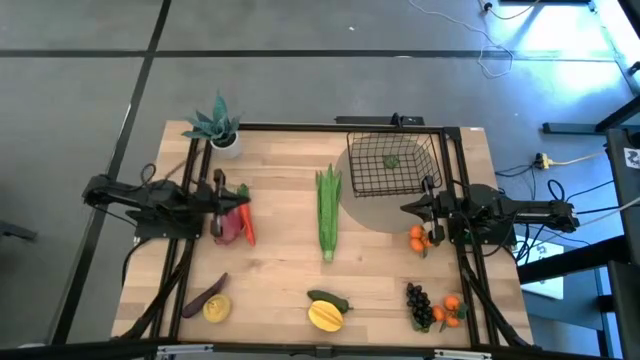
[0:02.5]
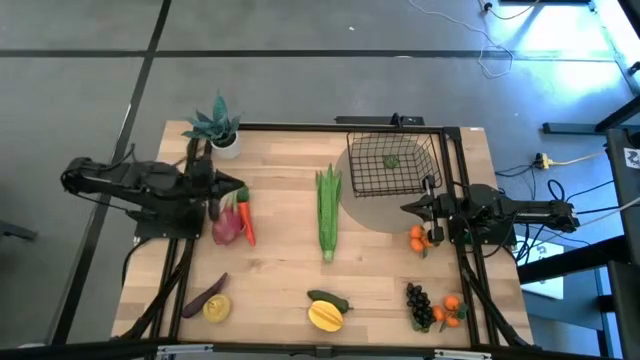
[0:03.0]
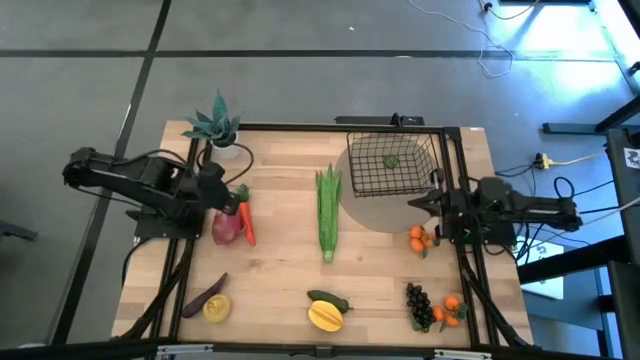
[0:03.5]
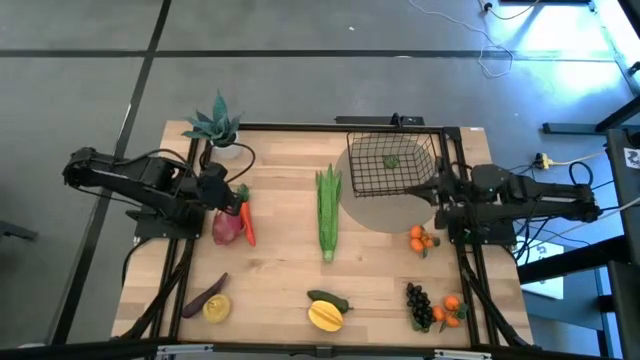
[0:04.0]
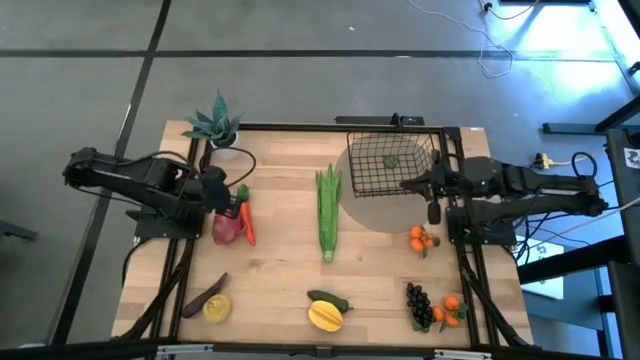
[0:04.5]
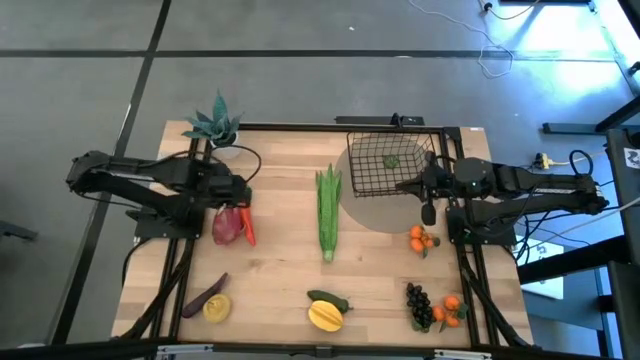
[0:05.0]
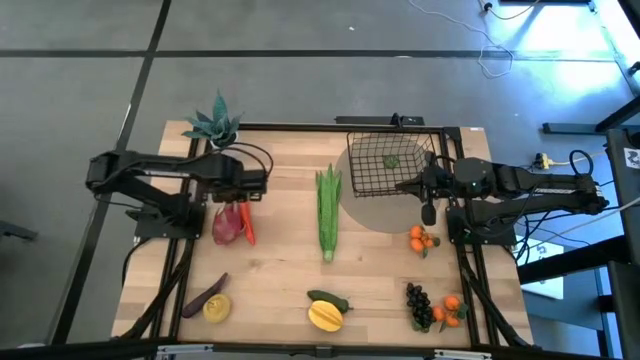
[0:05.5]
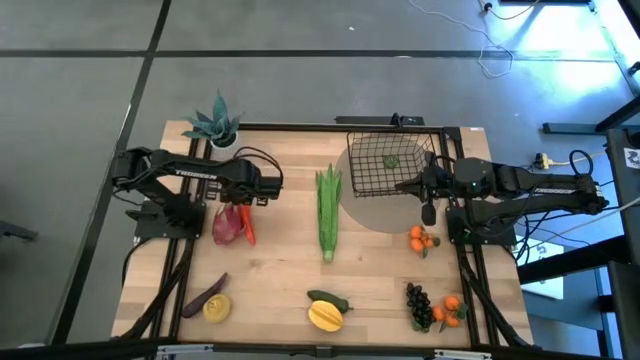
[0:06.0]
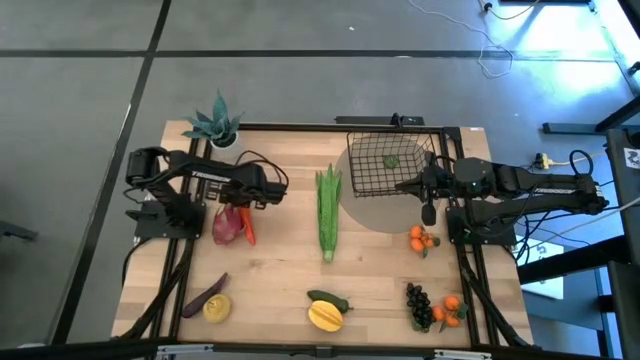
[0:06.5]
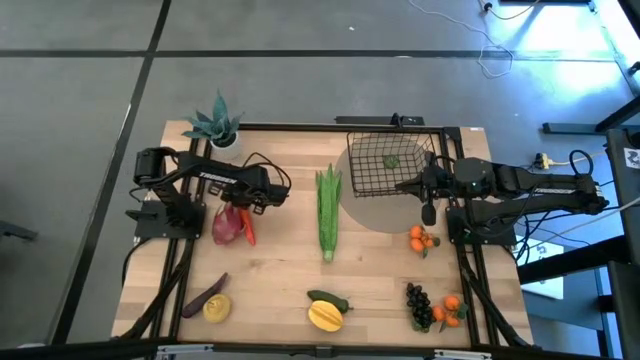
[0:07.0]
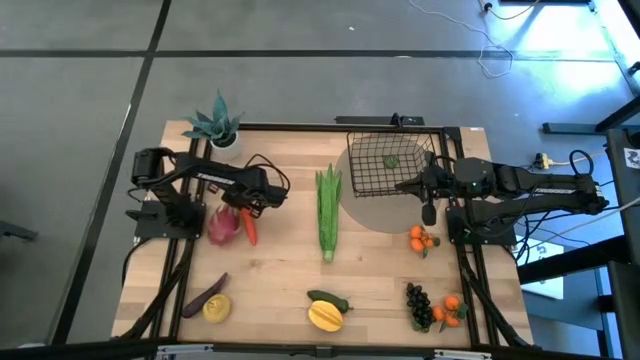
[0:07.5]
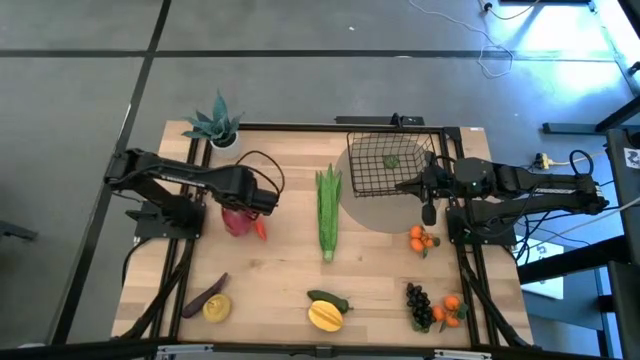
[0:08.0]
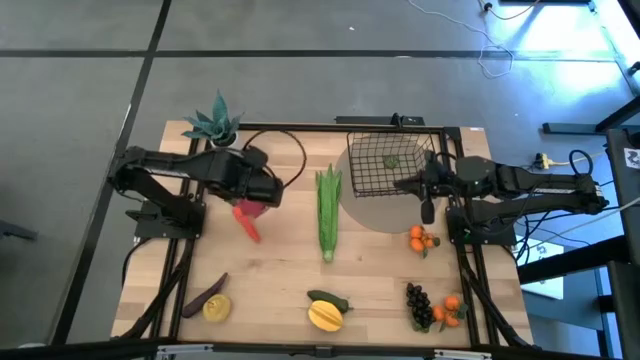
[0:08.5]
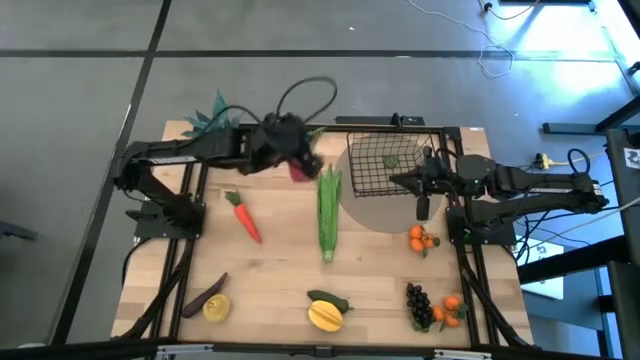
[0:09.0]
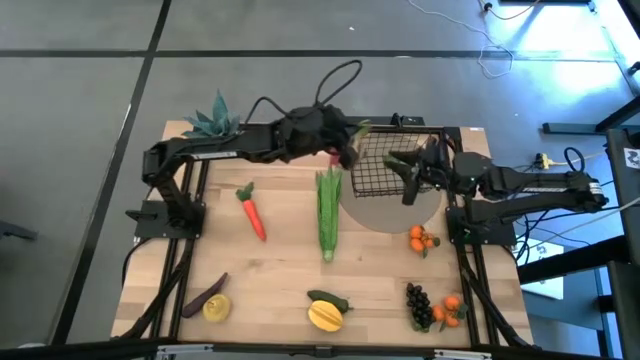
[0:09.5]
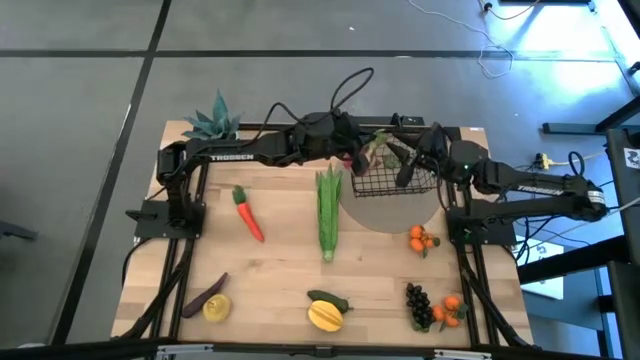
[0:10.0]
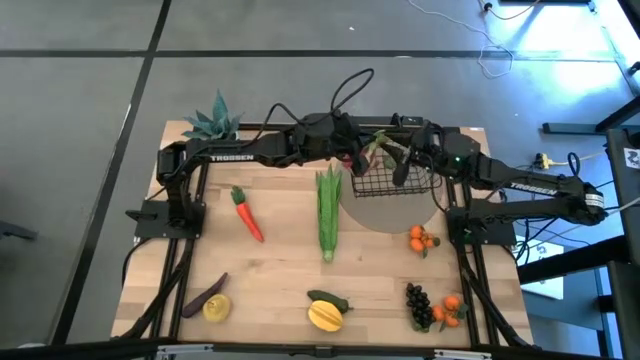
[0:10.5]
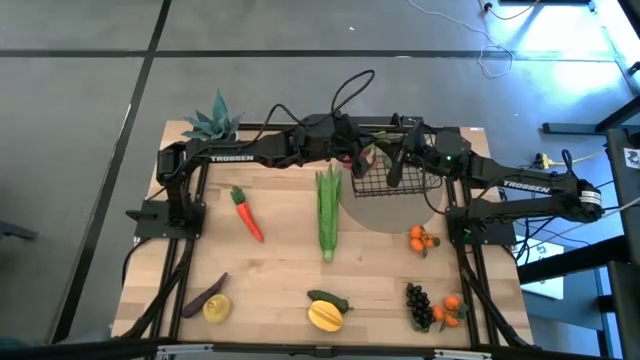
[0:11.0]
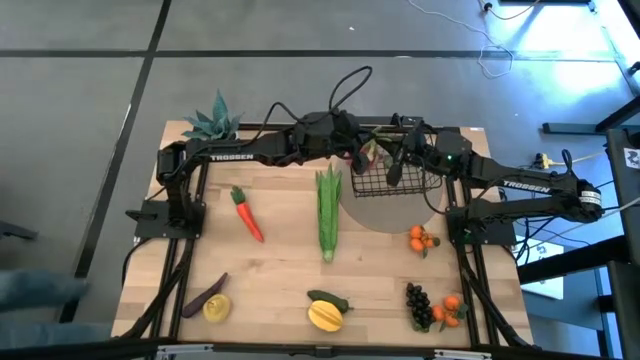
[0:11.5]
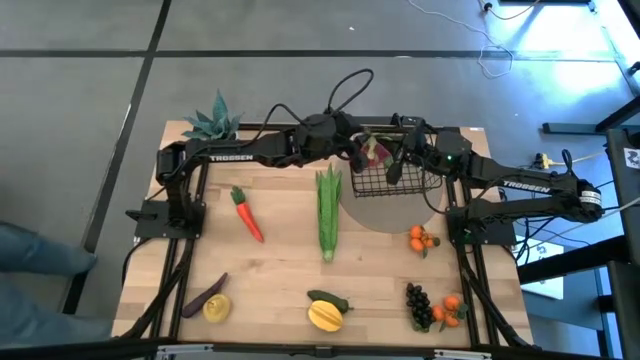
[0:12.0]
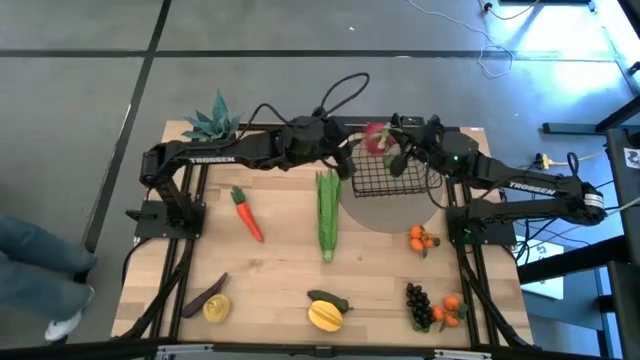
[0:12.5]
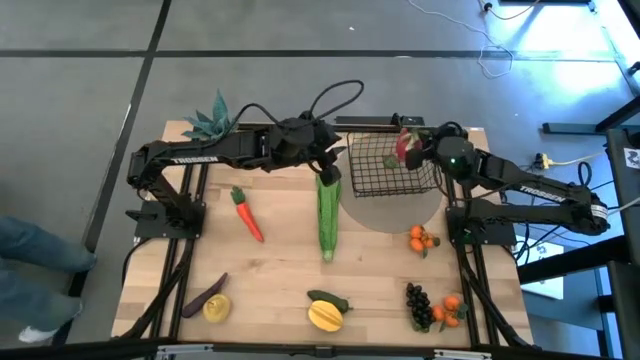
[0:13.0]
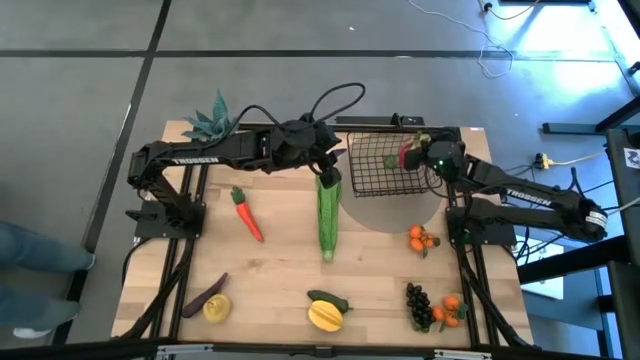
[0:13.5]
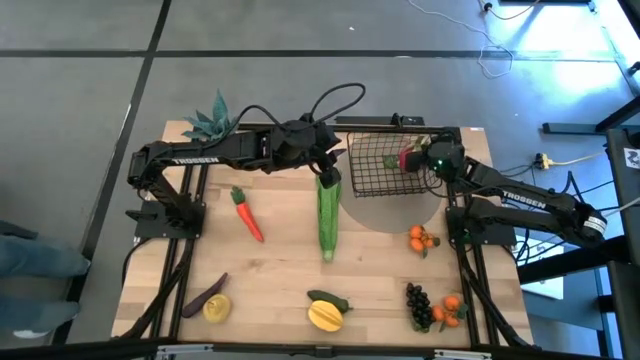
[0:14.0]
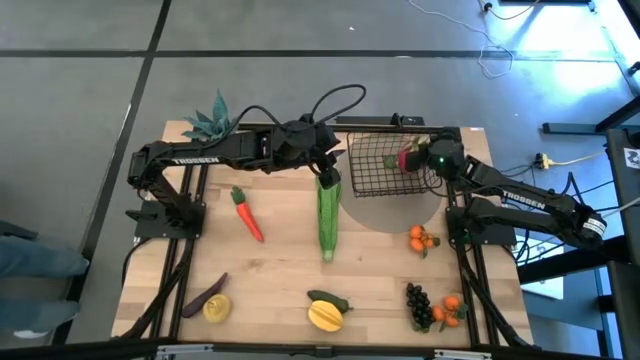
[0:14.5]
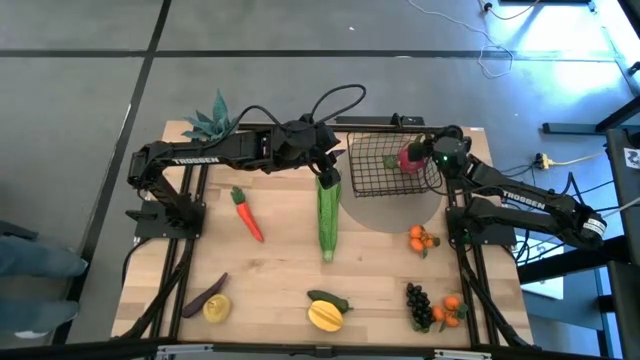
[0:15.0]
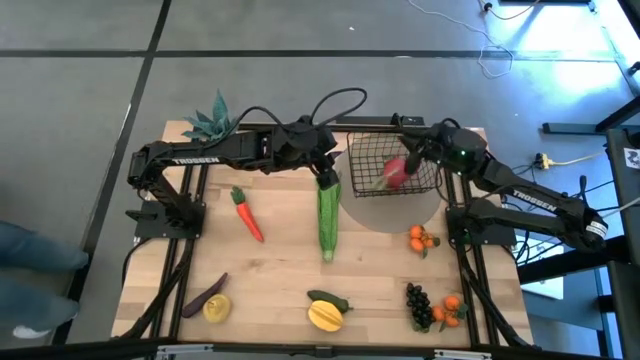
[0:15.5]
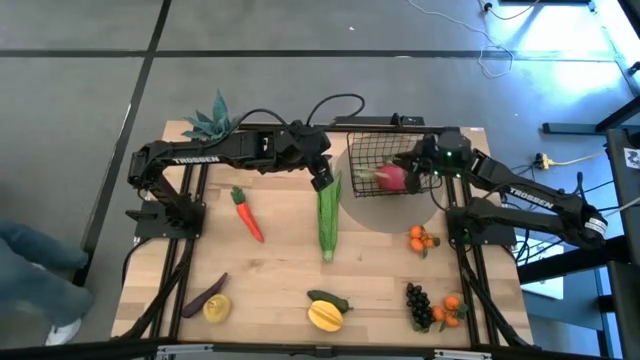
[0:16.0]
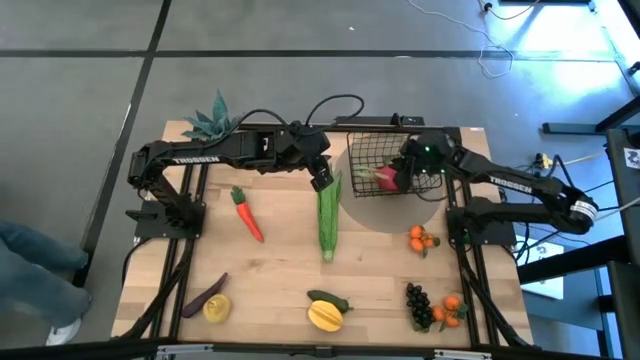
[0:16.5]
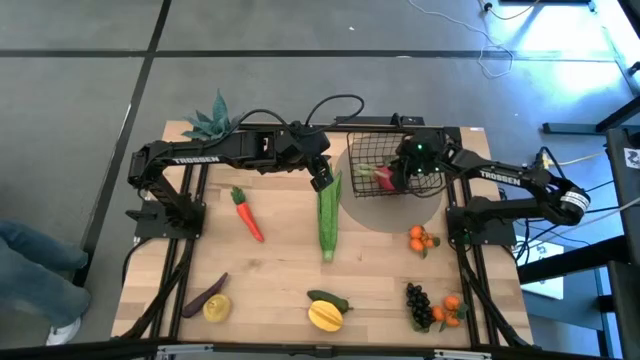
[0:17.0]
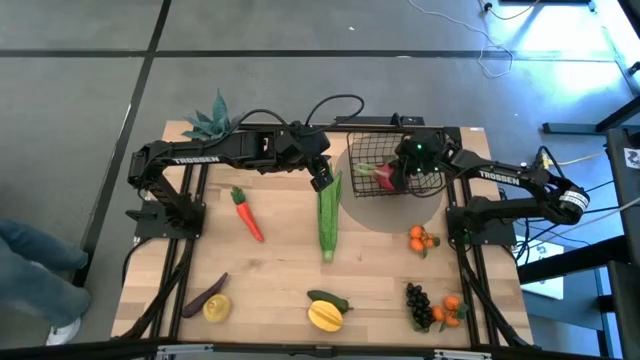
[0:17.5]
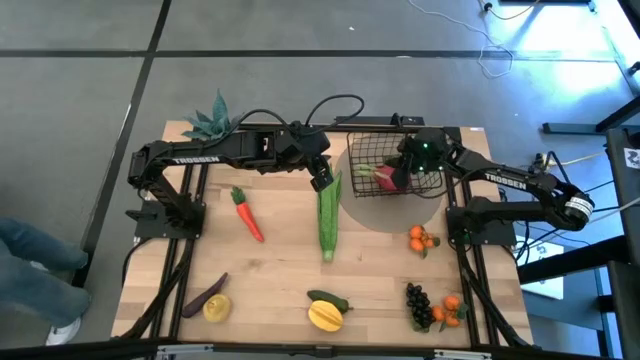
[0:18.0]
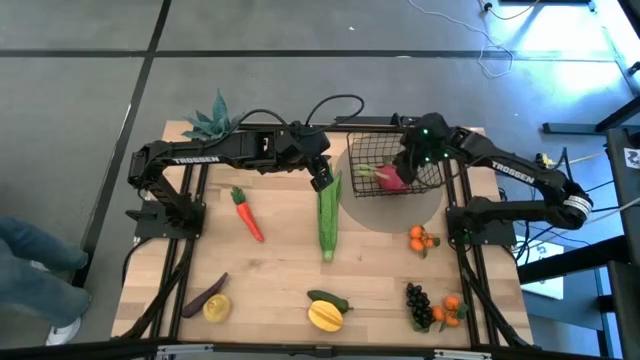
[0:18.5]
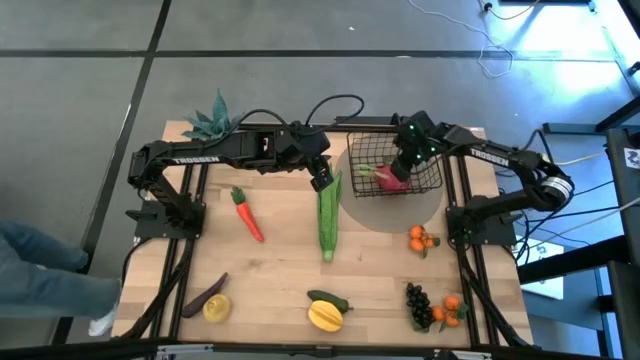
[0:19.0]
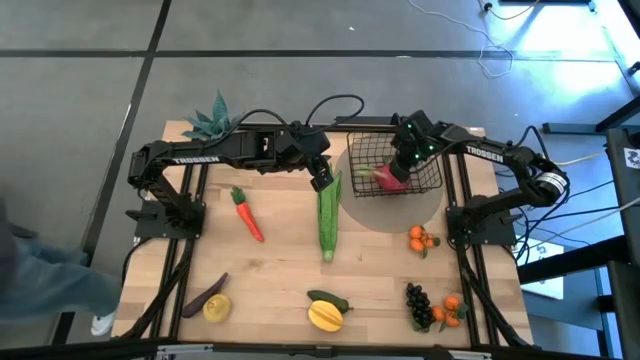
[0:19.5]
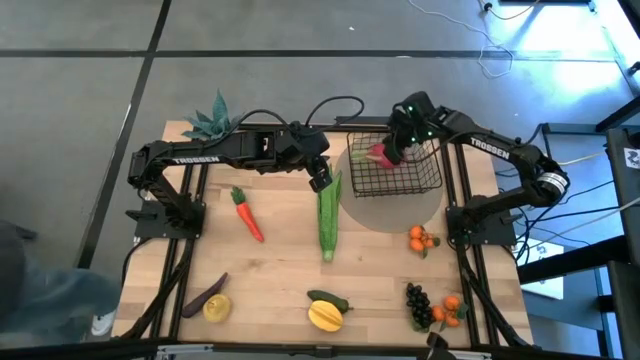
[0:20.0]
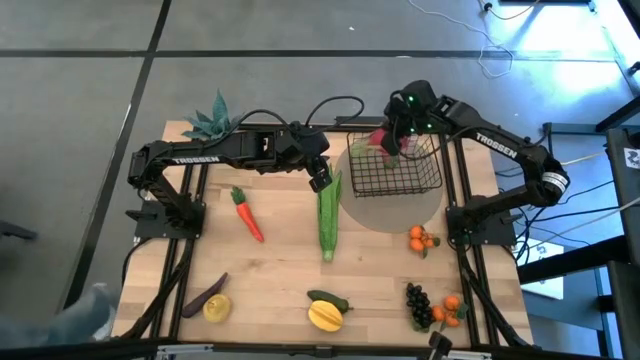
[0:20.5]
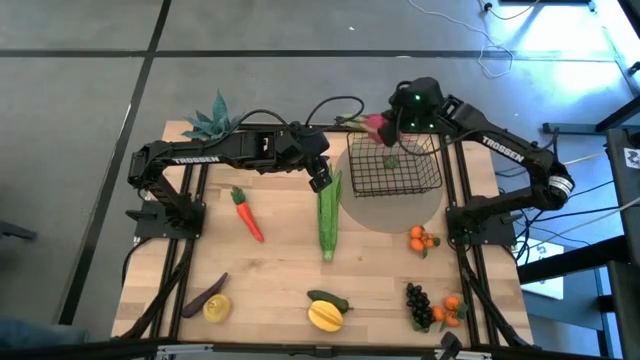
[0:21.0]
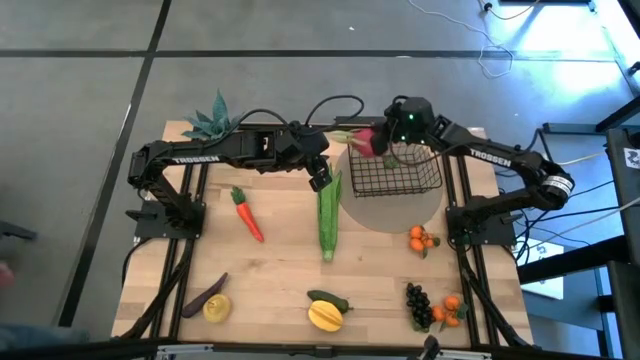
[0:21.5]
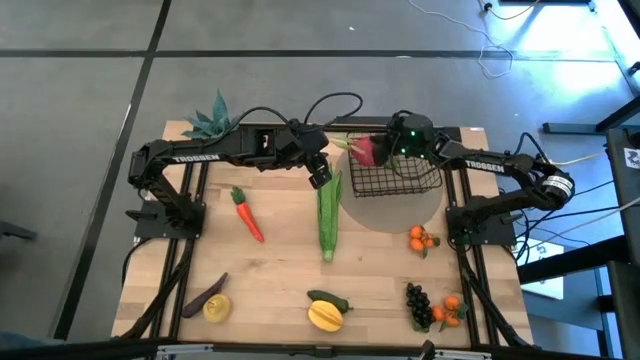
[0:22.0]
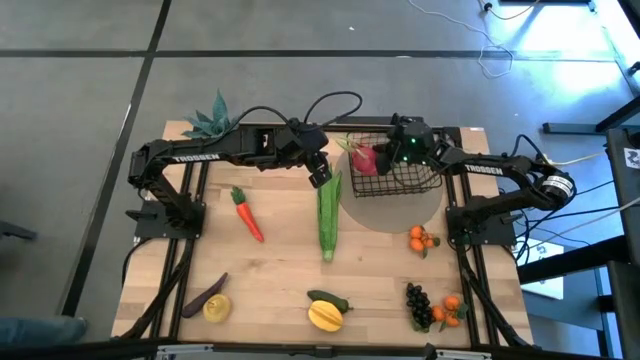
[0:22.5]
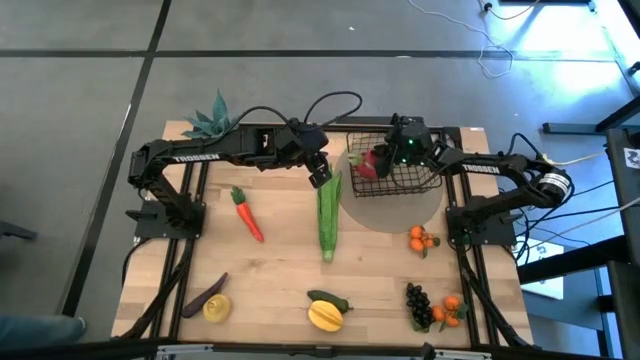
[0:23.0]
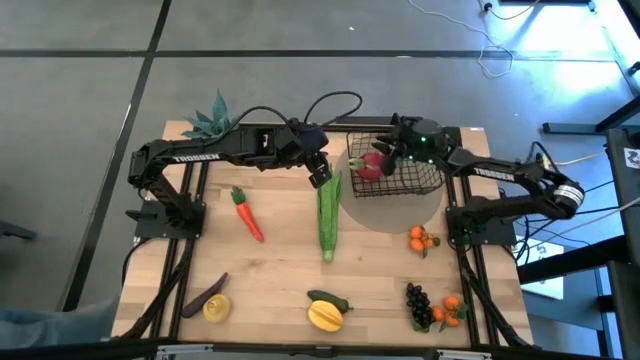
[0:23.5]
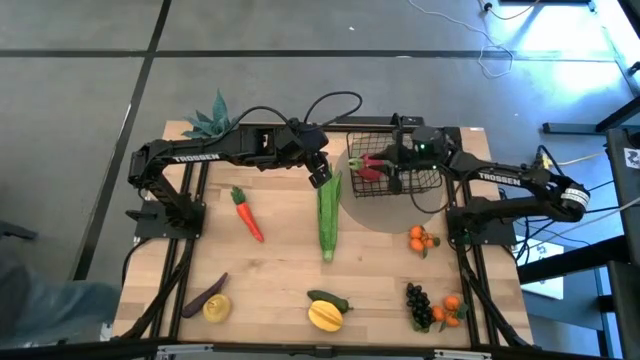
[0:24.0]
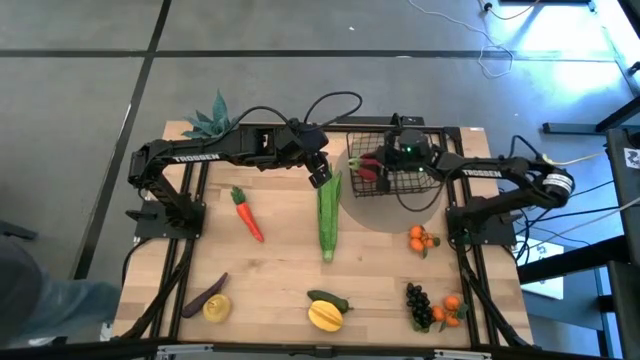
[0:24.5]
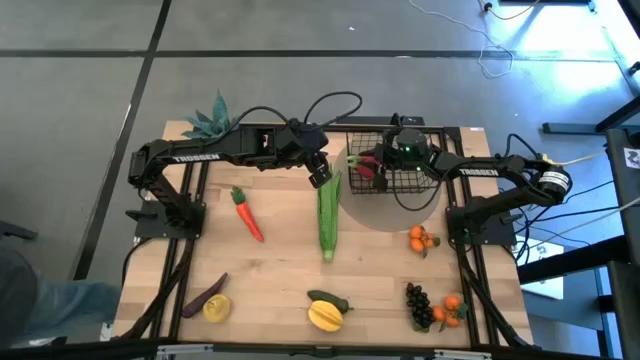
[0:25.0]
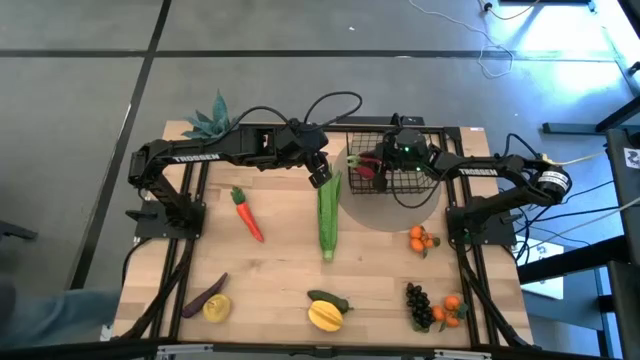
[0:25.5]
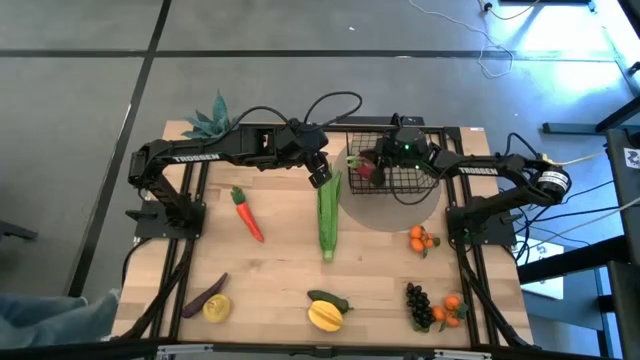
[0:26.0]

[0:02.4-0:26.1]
Task: Build produce basket
Put the dragon fruit into the black wire basket
